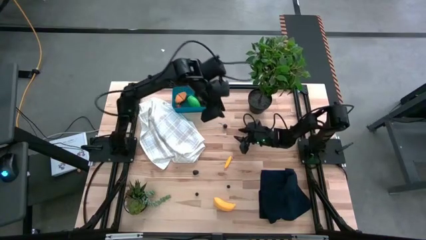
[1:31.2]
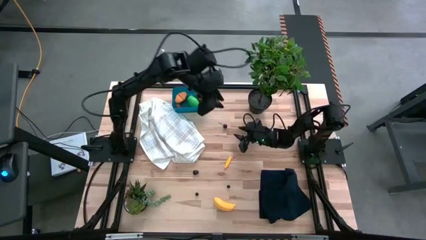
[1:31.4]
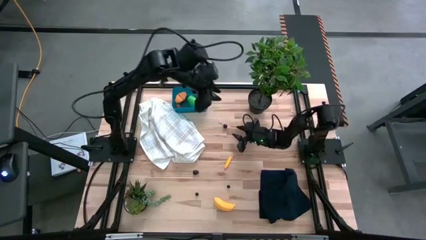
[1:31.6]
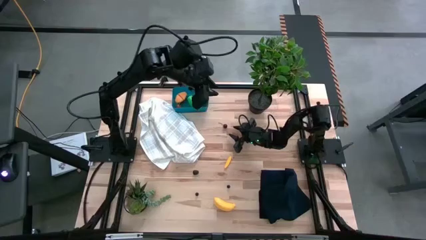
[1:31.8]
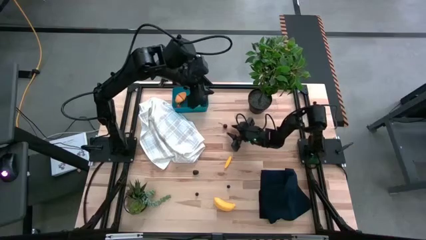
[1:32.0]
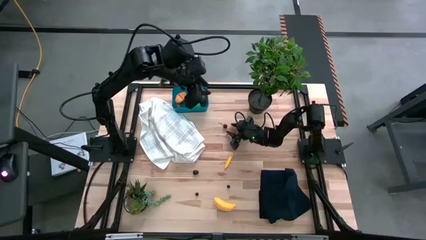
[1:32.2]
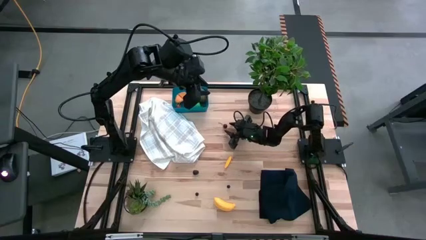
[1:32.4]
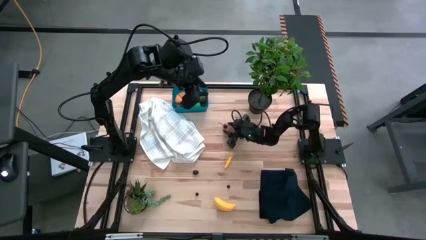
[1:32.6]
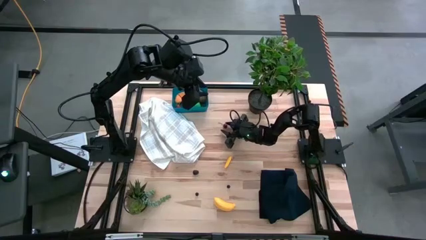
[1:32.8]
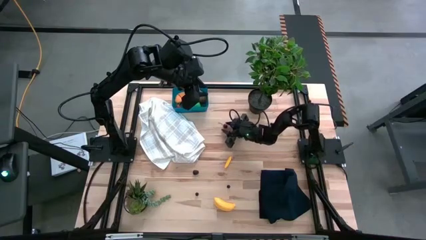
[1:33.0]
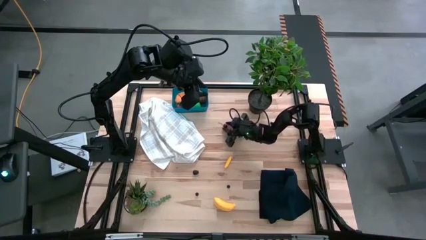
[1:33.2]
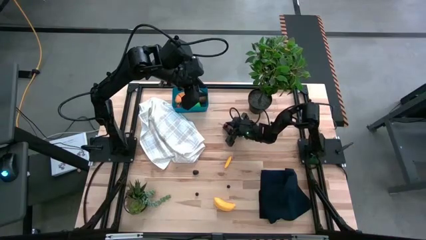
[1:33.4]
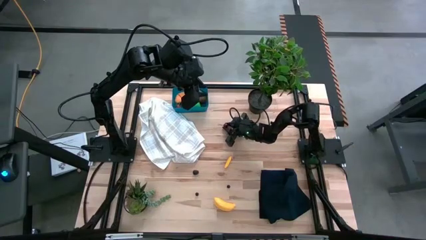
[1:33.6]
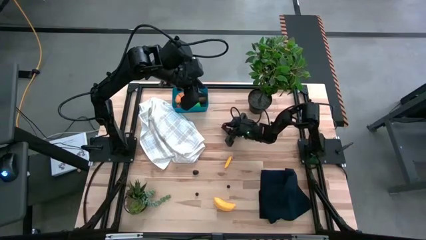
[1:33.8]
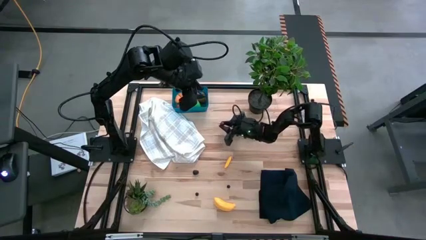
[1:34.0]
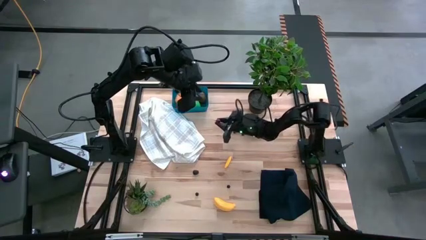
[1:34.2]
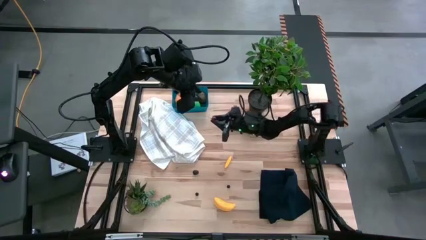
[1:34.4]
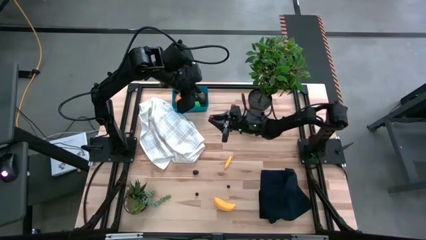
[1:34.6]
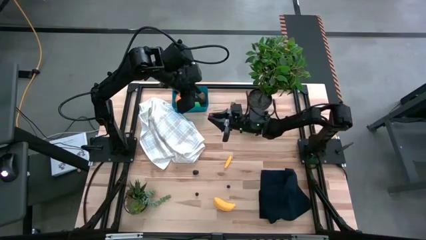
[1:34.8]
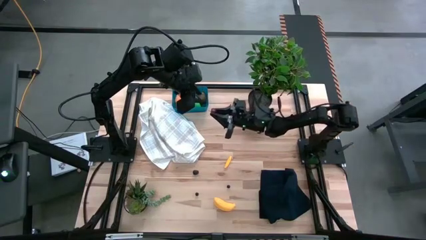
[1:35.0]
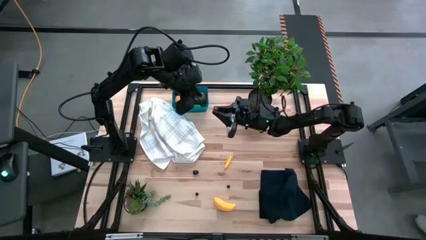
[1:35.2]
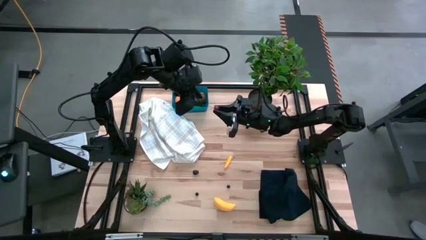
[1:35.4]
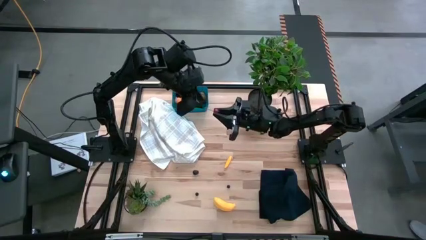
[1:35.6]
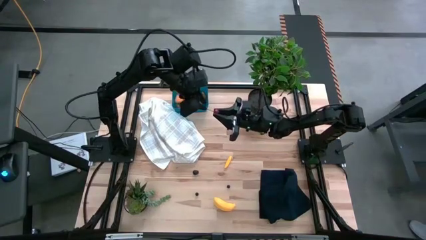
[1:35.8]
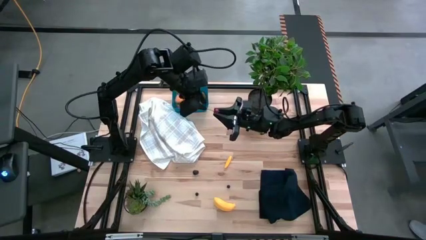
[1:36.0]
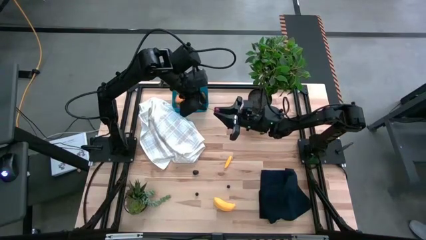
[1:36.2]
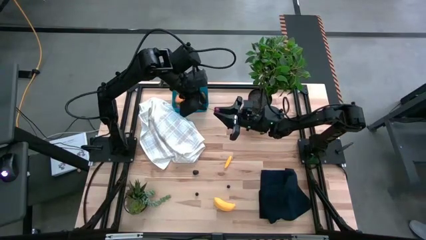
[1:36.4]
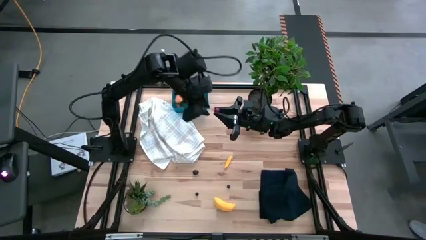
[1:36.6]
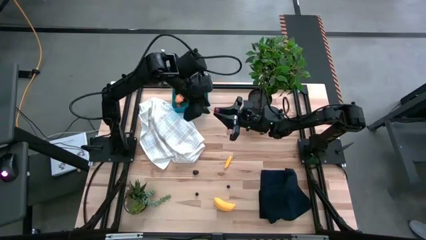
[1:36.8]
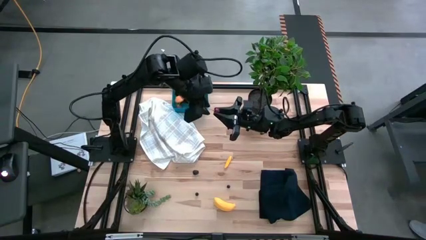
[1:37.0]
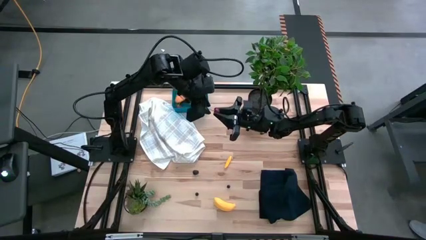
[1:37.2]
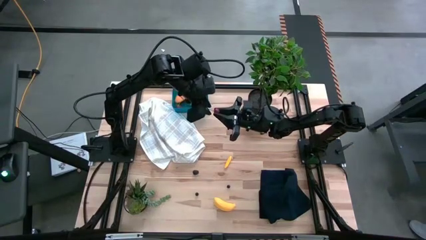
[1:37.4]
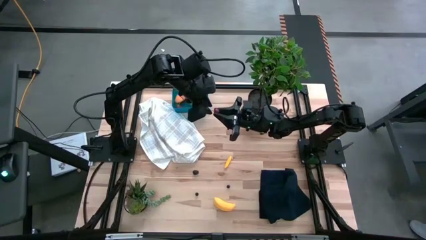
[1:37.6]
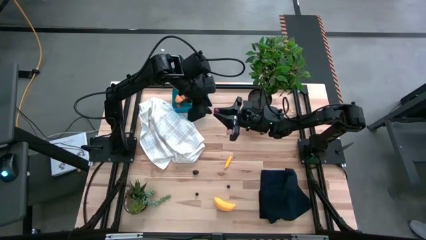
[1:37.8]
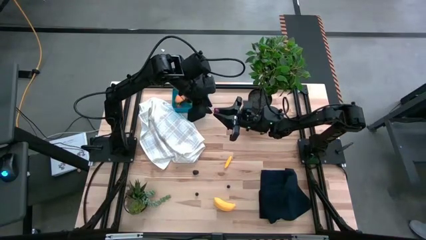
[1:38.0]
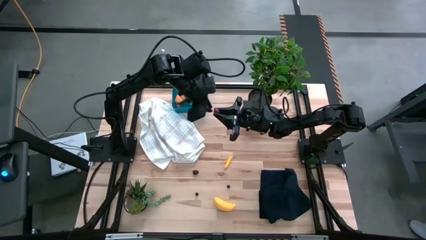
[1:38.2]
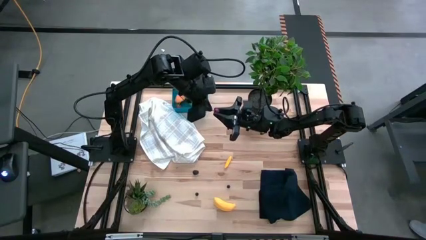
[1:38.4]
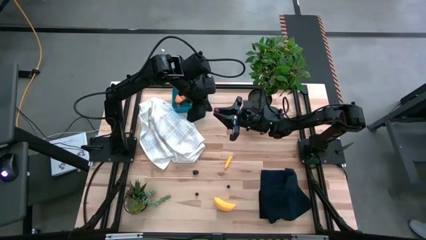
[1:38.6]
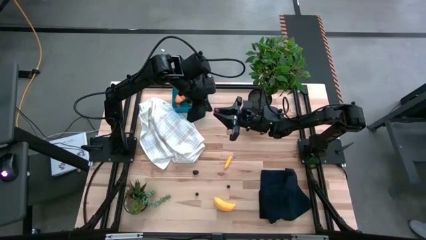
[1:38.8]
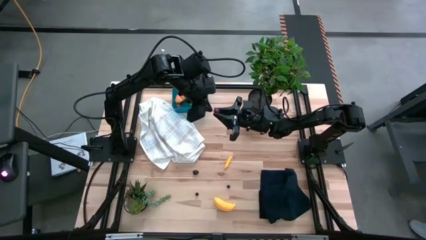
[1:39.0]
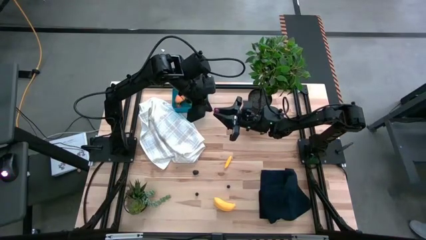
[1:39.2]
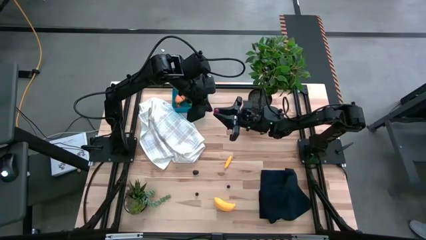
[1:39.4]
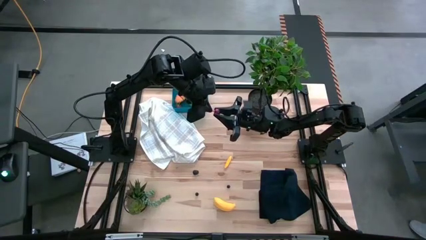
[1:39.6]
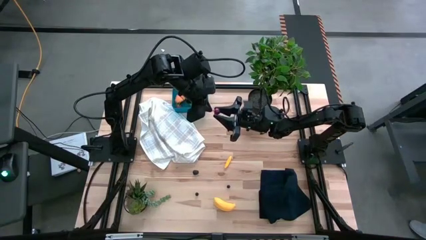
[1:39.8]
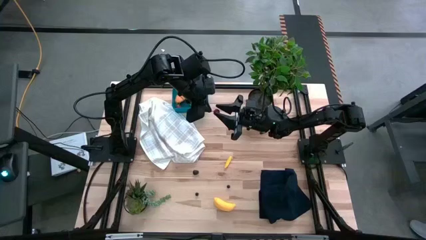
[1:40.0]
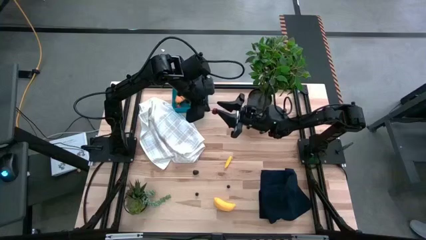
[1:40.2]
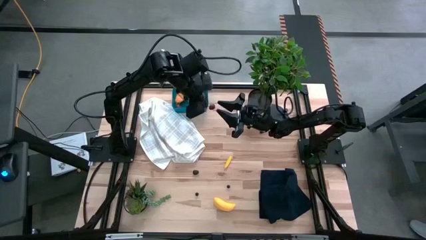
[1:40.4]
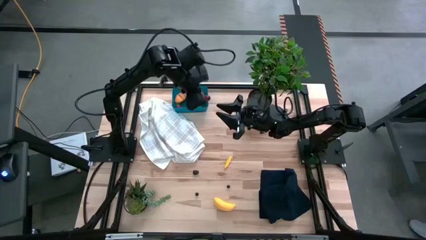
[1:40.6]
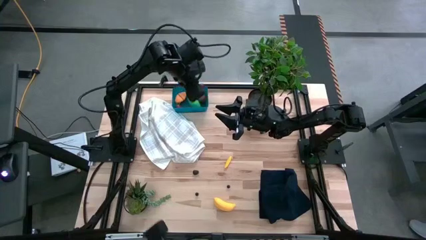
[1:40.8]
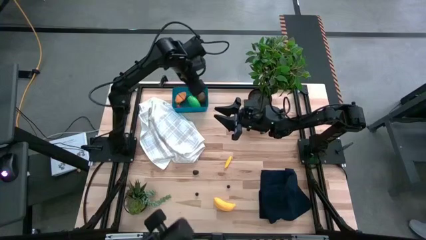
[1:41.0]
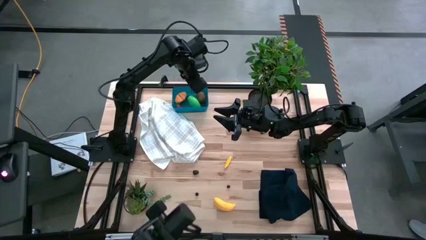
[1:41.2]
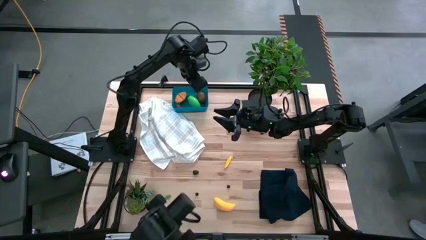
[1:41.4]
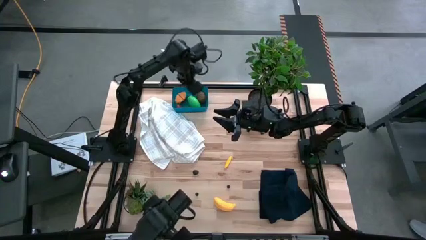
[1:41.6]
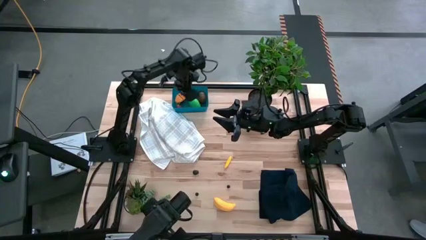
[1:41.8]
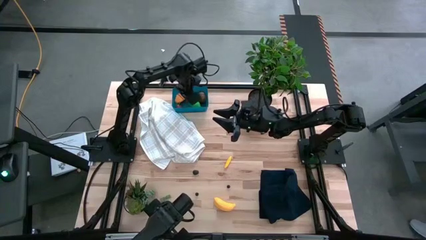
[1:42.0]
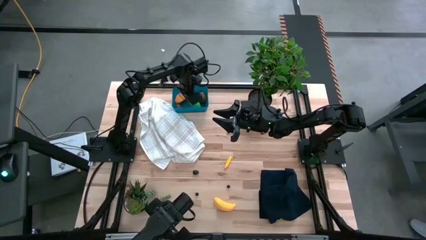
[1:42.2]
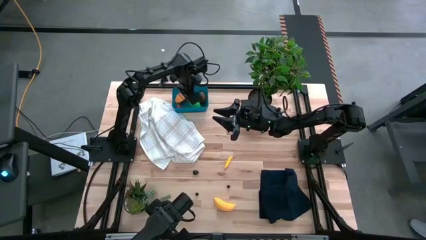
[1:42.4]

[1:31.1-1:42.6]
Task: Pick and placing Produce into tupperware
Put the red cherry into the blue bin
